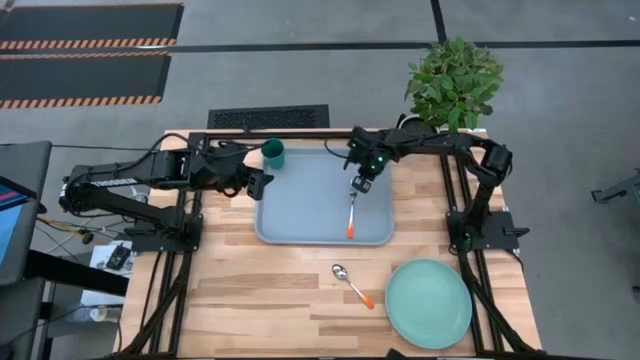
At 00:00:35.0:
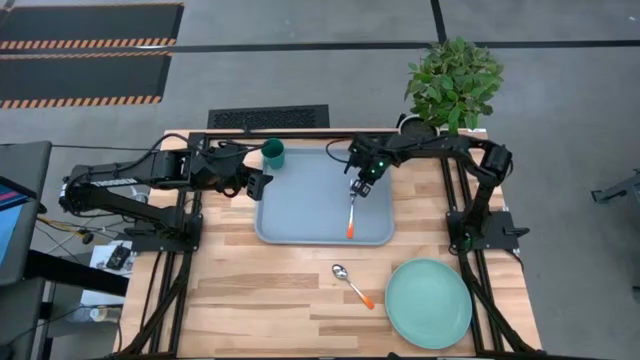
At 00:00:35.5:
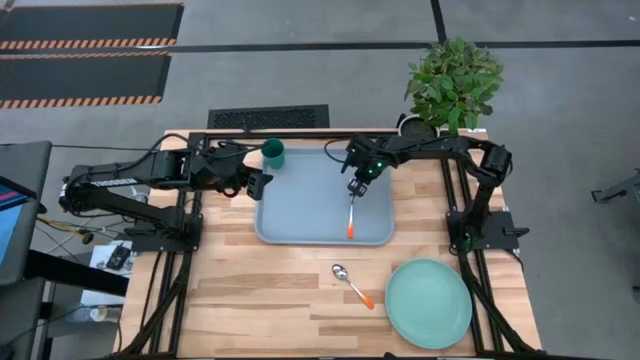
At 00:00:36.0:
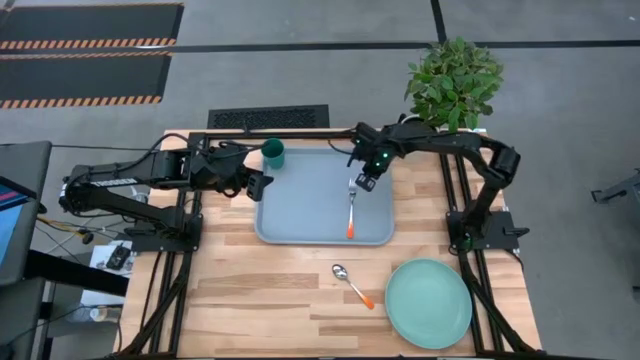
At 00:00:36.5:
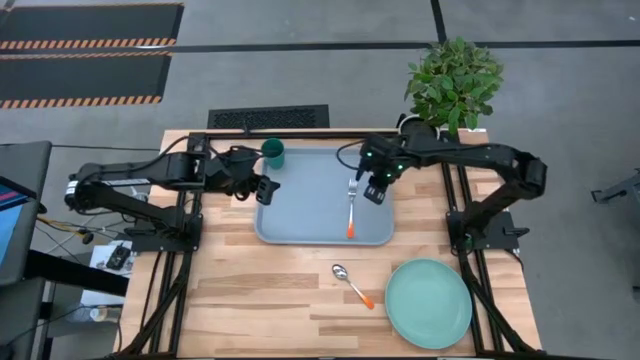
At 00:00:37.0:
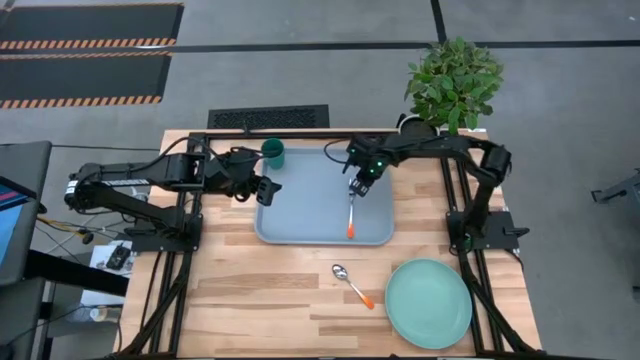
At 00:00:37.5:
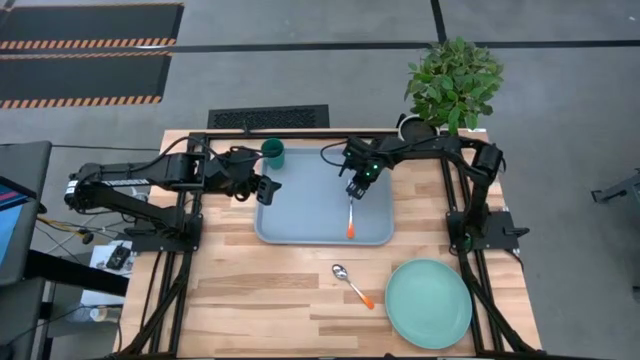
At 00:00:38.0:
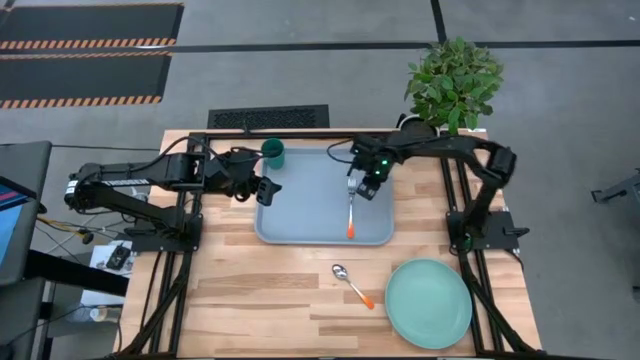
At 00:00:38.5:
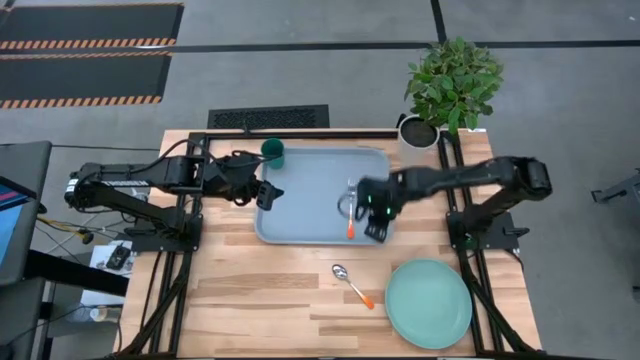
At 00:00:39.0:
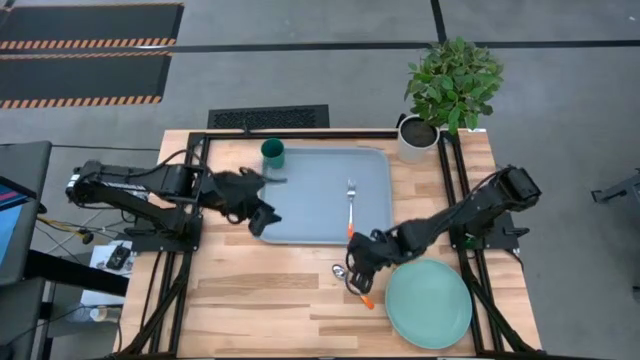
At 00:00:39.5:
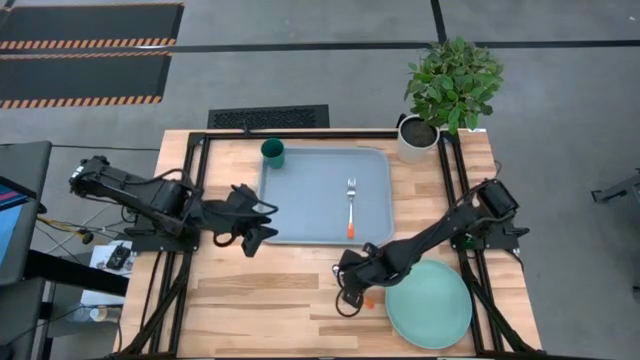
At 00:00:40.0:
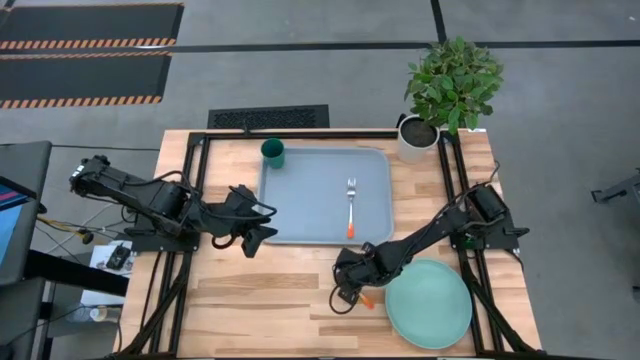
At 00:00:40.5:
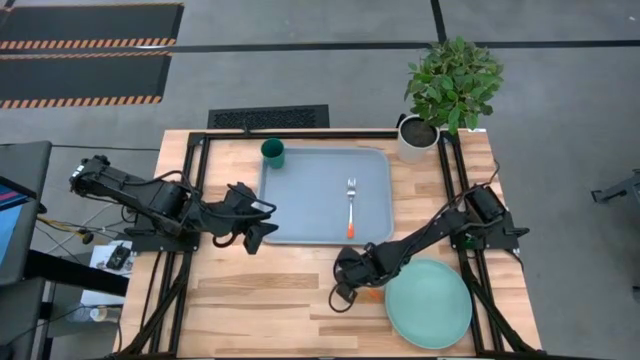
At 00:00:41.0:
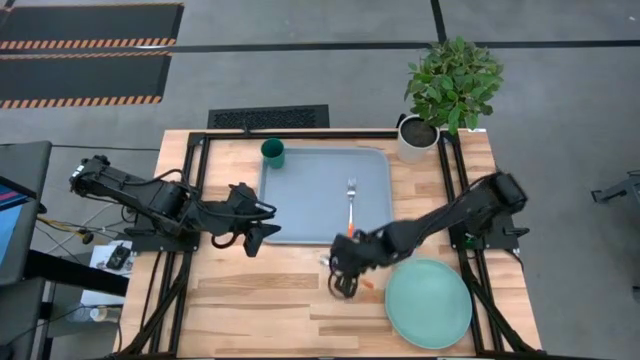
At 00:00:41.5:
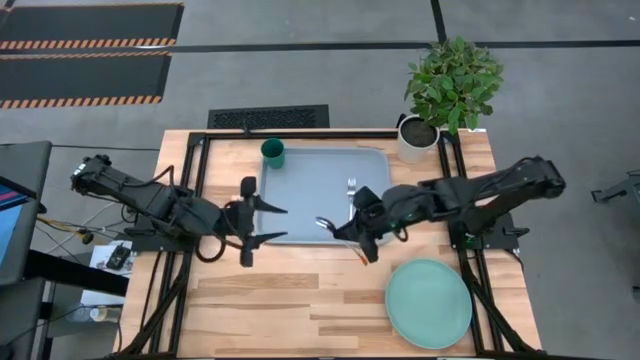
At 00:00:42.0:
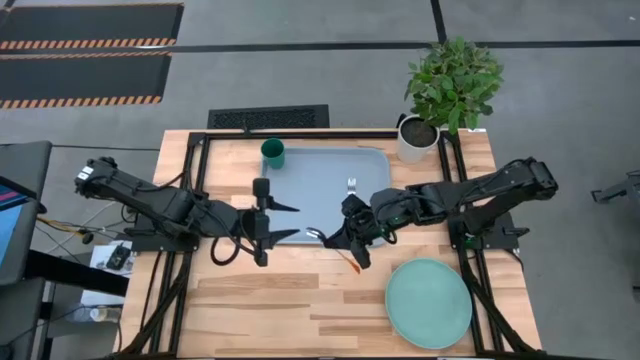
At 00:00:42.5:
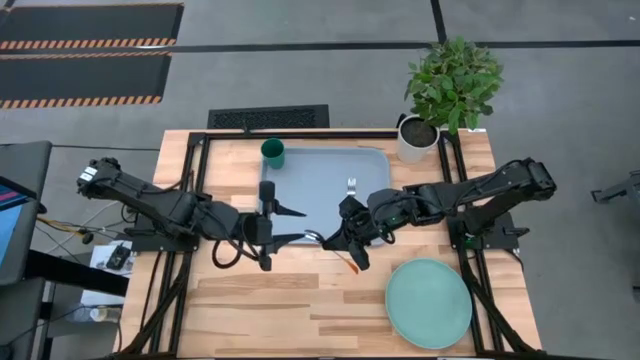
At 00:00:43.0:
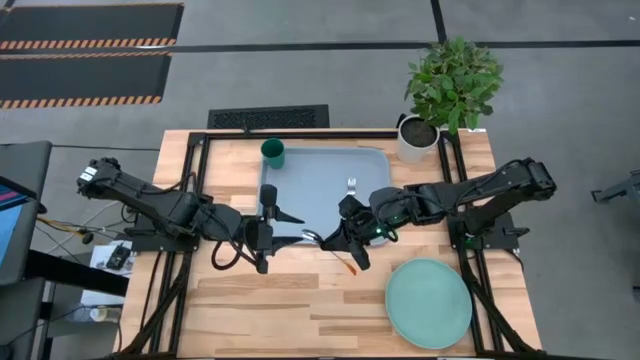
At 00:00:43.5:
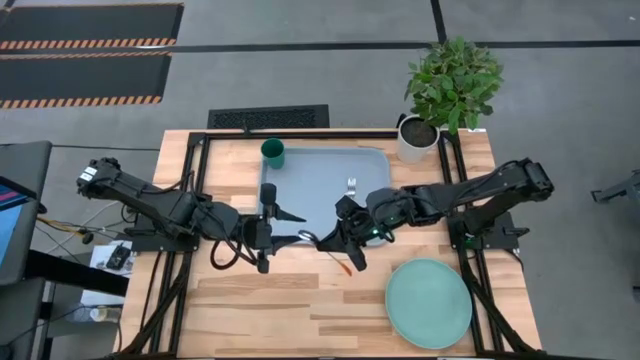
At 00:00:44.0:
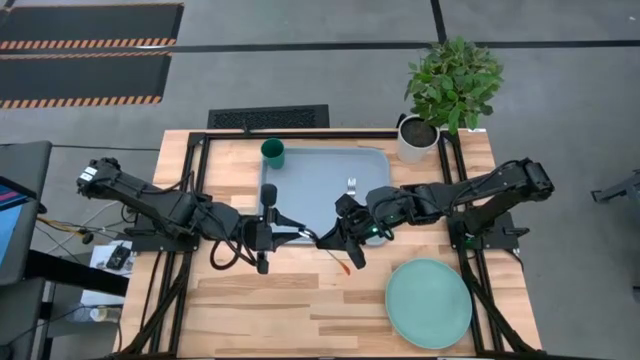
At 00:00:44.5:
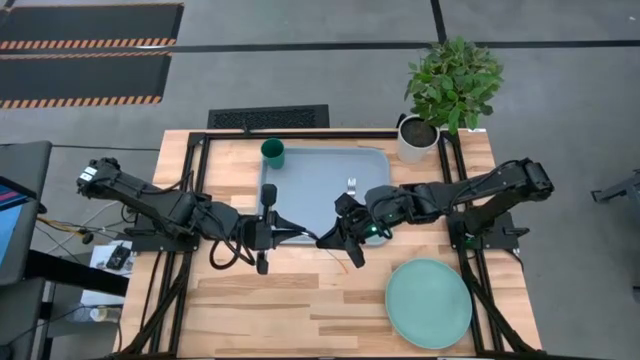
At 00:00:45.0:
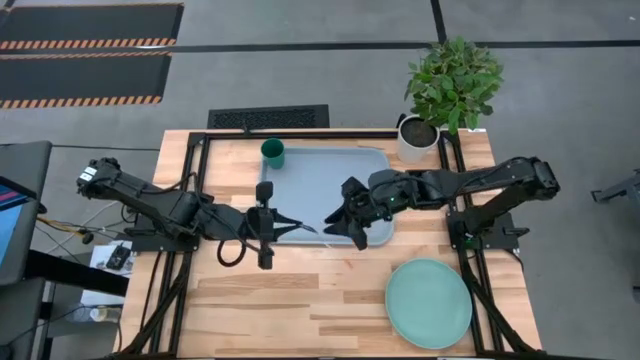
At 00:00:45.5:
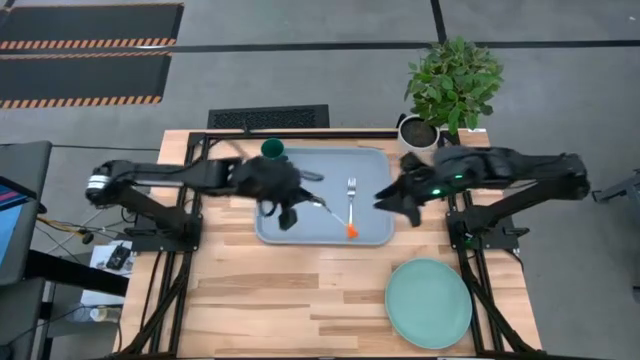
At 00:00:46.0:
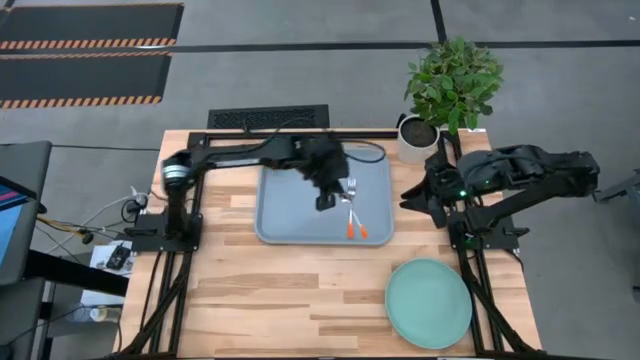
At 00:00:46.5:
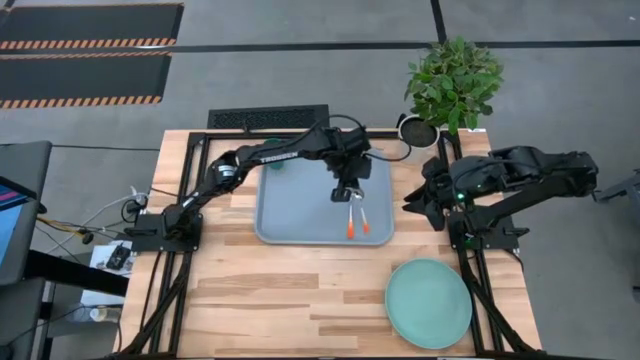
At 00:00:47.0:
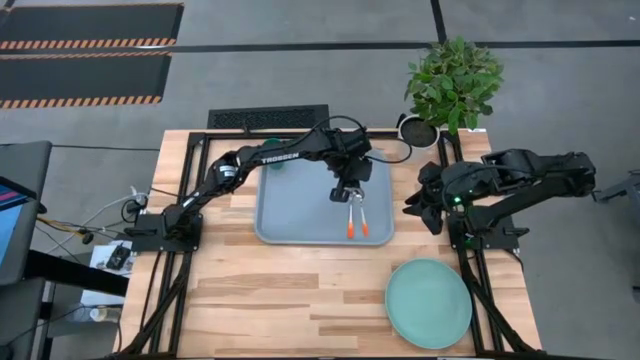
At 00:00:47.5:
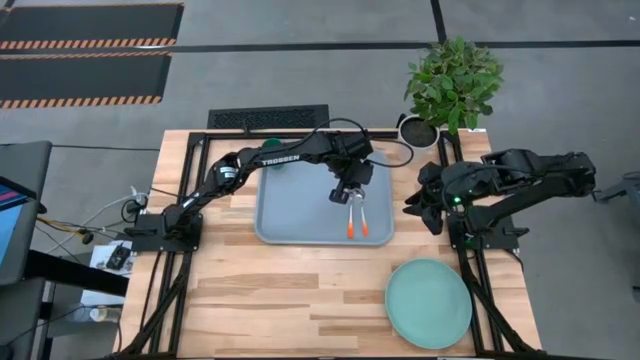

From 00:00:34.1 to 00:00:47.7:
Task: Pick and place plate/cup/fork/spoon on tray
Put the orange spoon on the gray tray to the right of the orange fork

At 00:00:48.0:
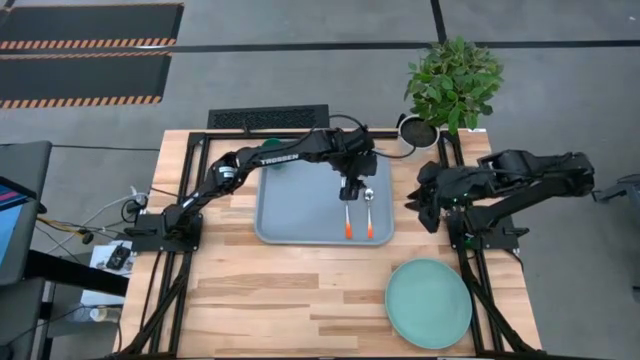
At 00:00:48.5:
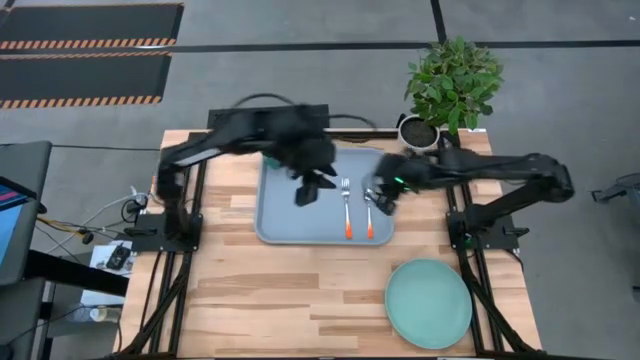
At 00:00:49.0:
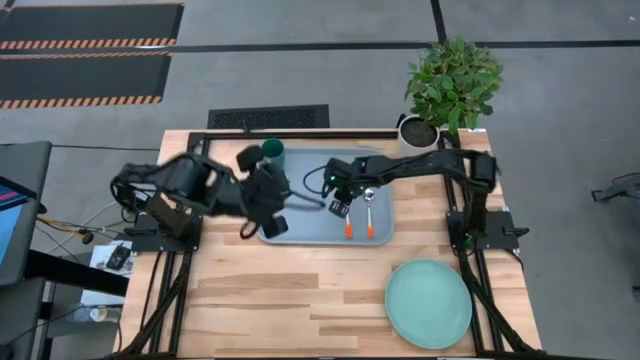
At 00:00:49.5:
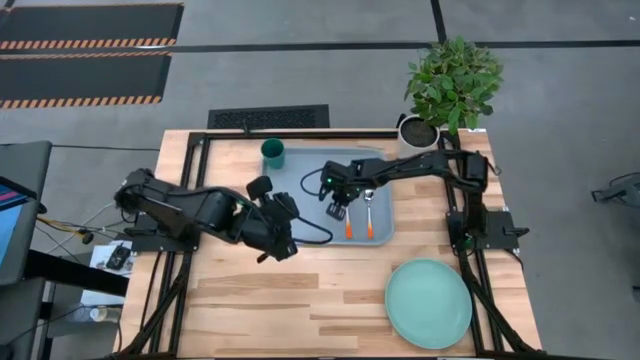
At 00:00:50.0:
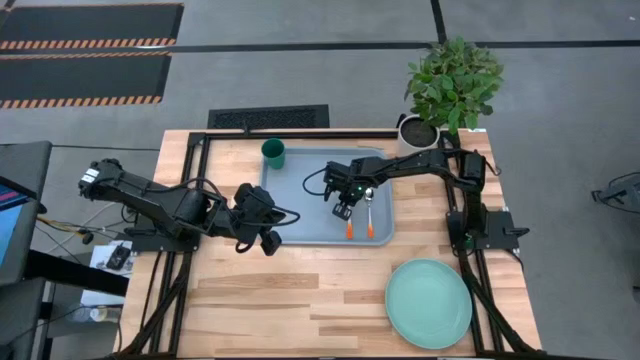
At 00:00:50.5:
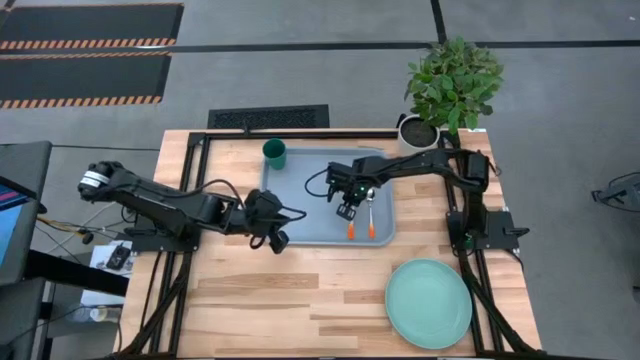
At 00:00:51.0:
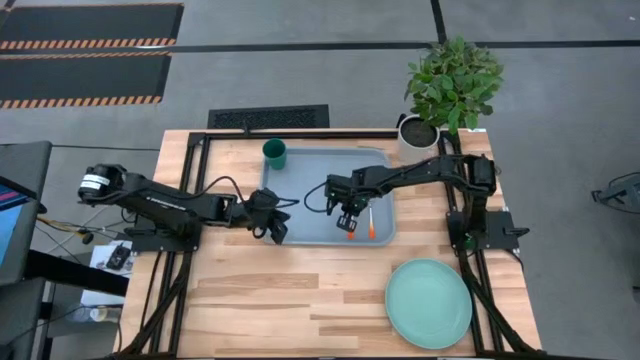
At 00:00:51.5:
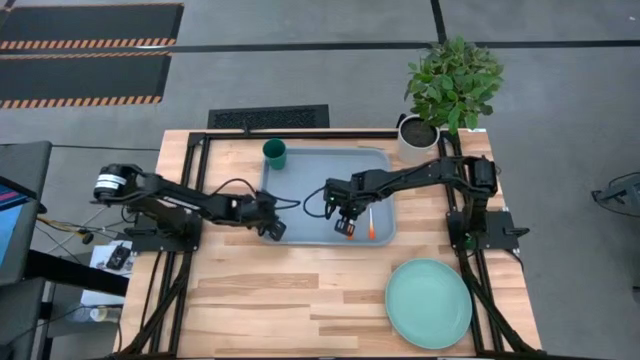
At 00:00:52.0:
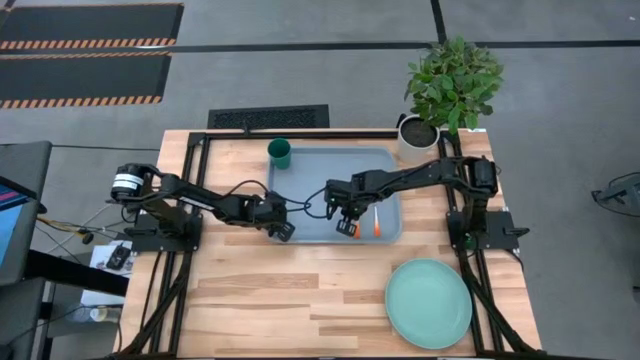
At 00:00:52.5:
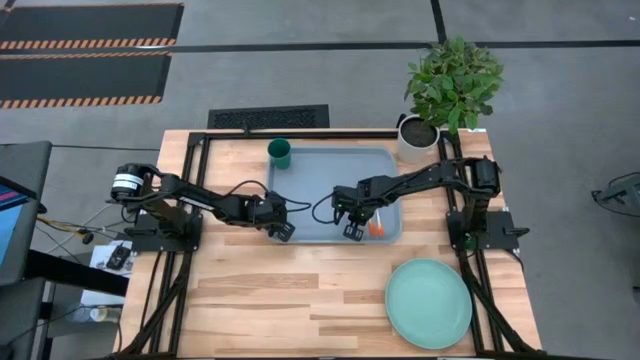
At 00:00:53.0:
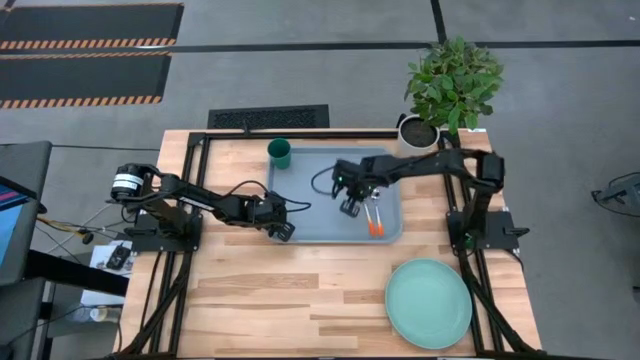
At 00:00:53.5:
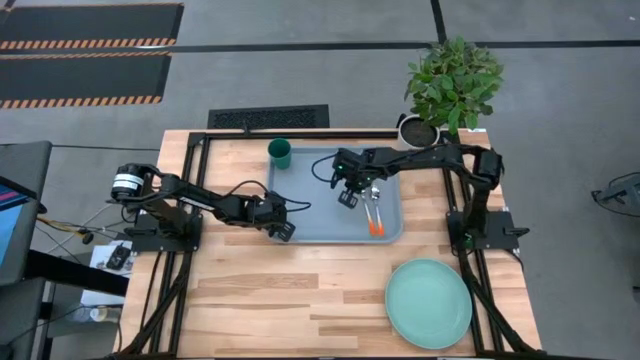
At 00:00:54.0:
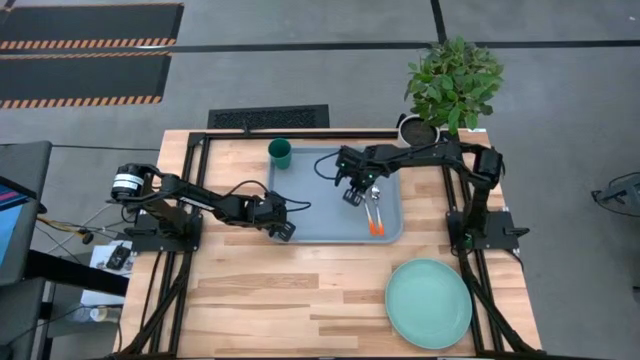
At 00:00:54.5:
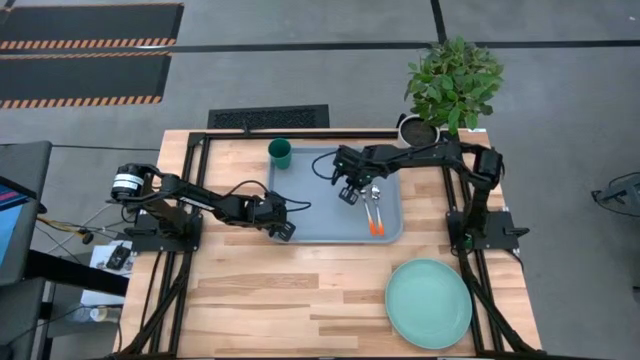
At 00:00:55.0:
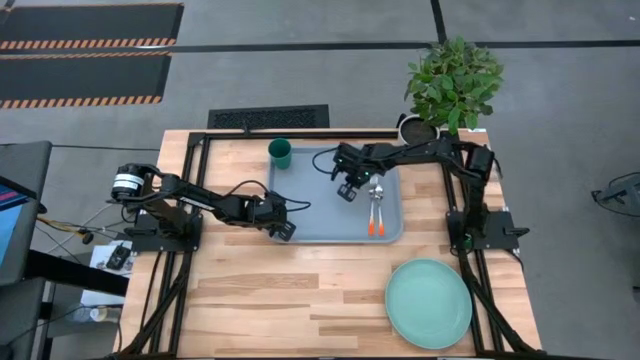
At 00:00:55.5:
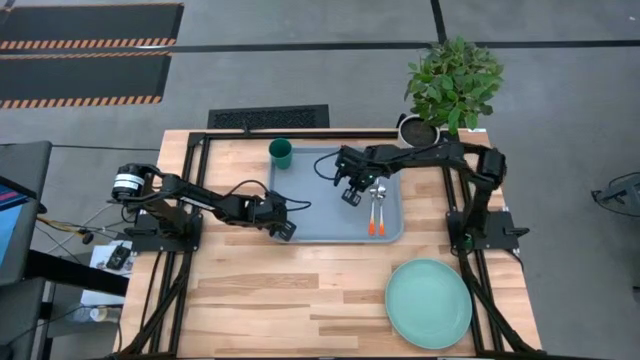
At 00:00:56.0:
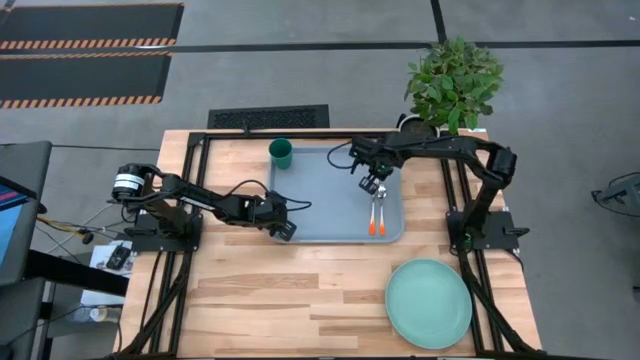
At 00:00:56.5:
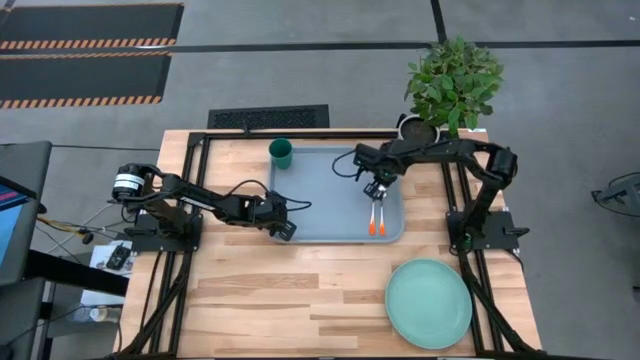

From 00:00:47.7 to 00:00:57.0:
Adjust the orange fork on the gray tray
